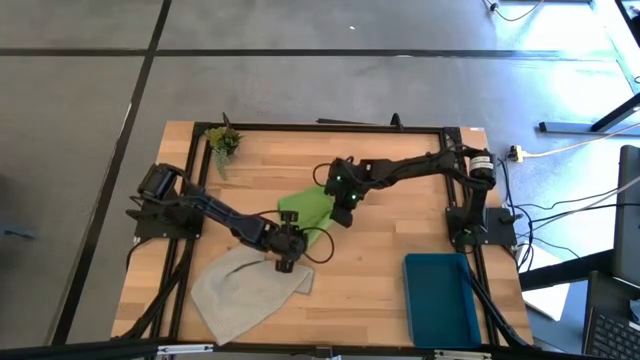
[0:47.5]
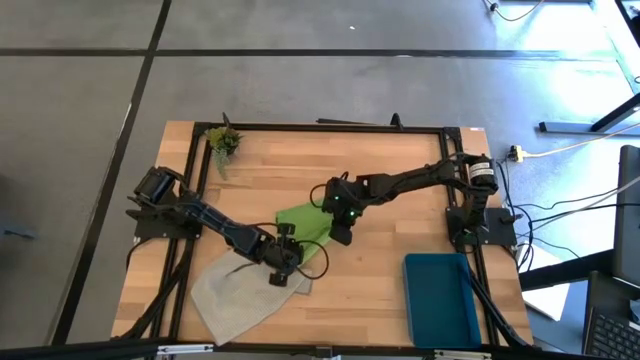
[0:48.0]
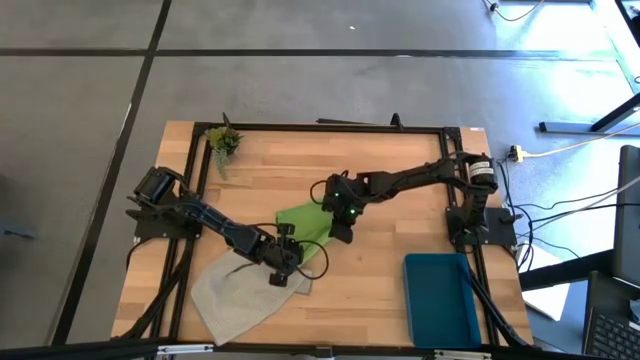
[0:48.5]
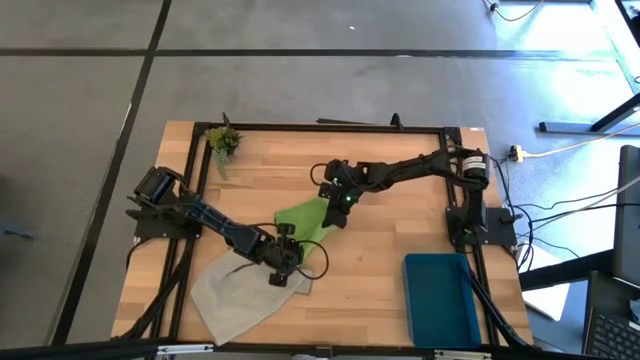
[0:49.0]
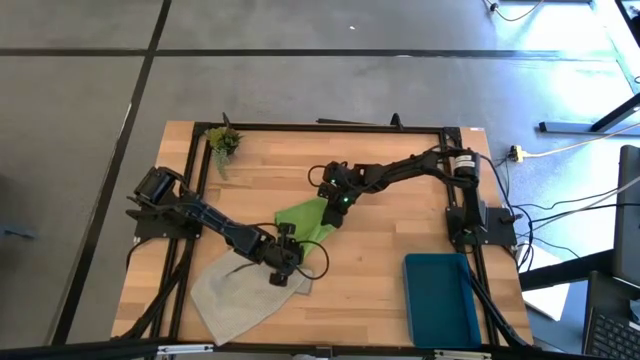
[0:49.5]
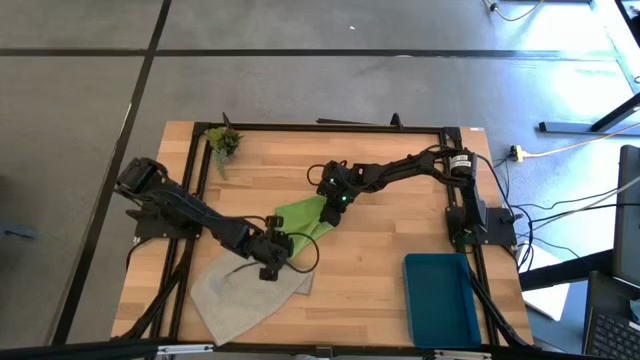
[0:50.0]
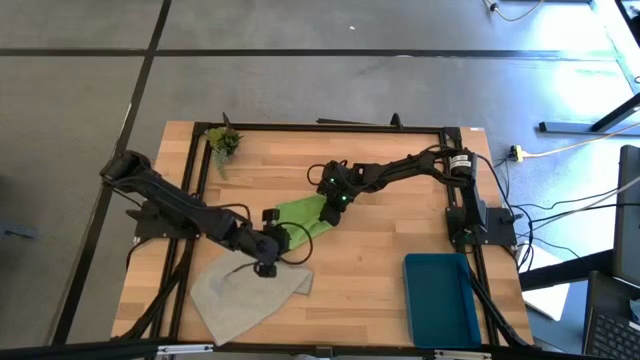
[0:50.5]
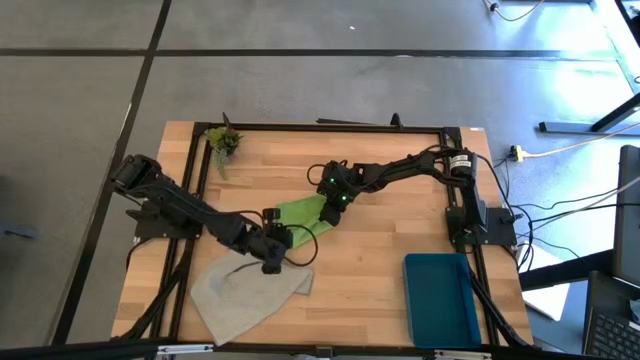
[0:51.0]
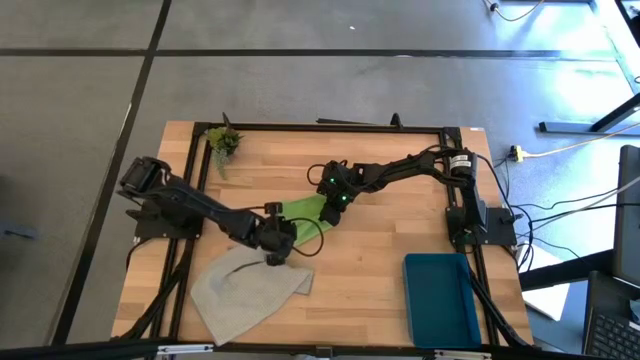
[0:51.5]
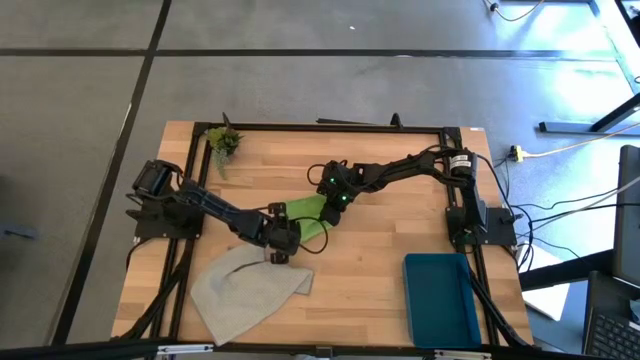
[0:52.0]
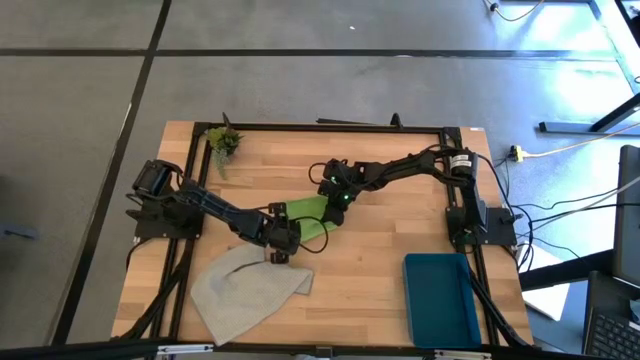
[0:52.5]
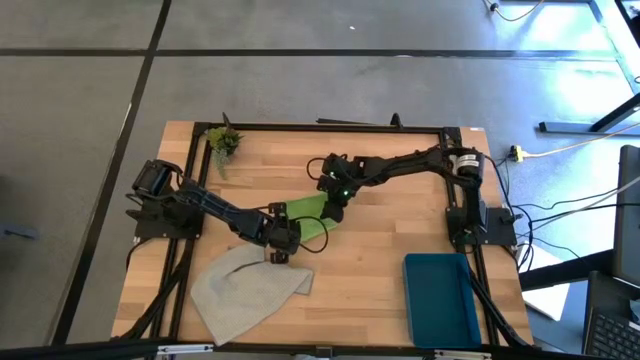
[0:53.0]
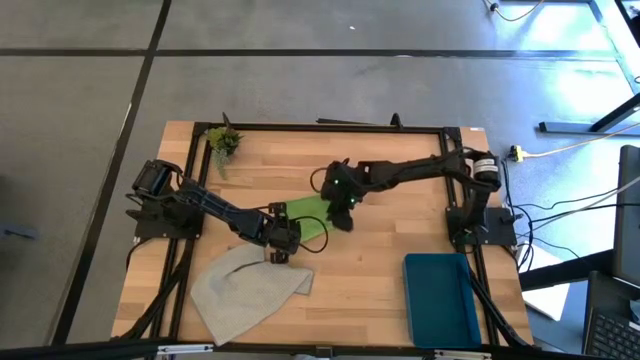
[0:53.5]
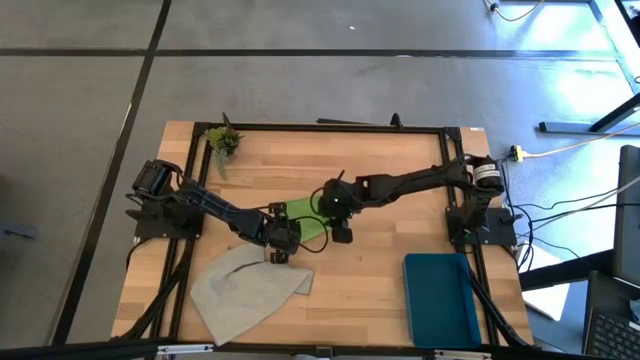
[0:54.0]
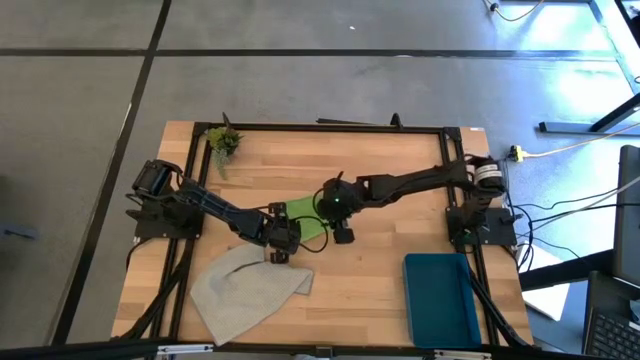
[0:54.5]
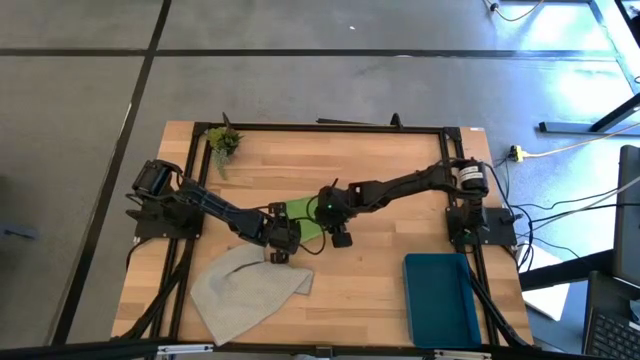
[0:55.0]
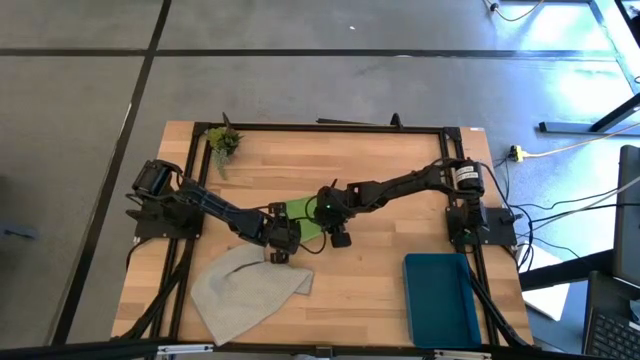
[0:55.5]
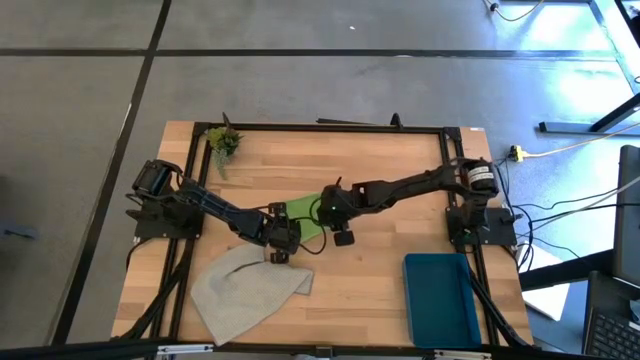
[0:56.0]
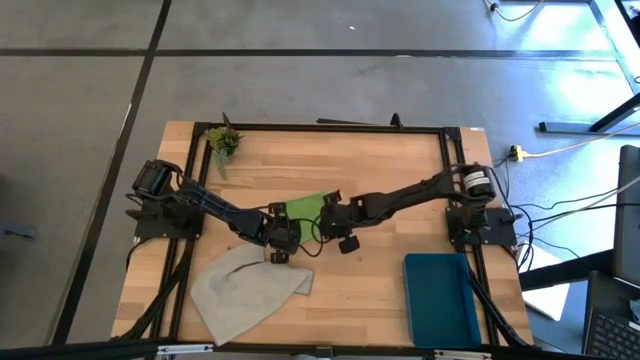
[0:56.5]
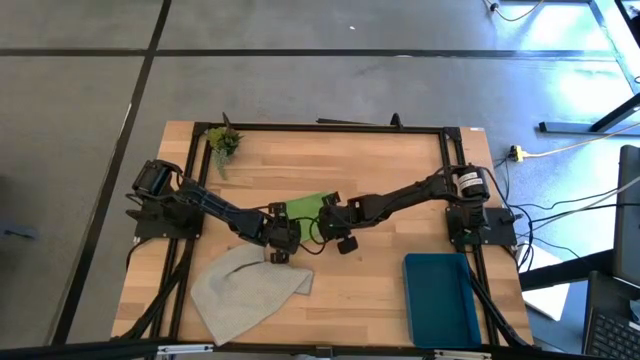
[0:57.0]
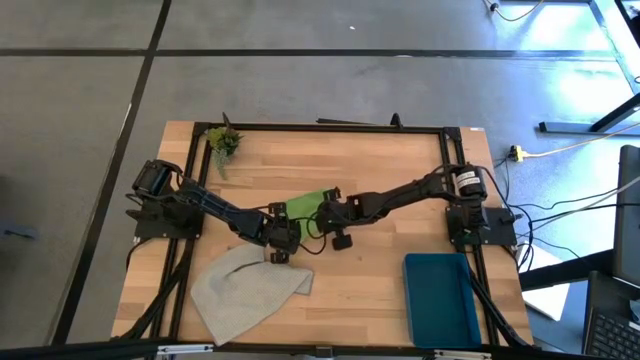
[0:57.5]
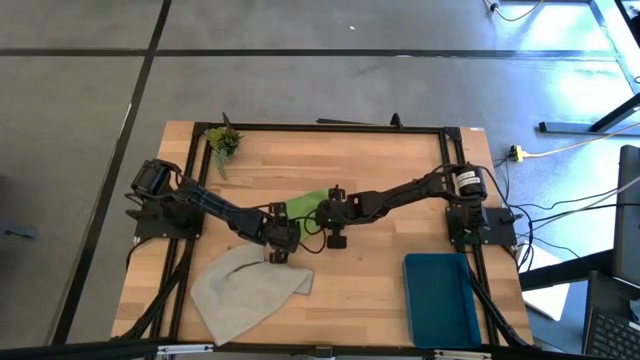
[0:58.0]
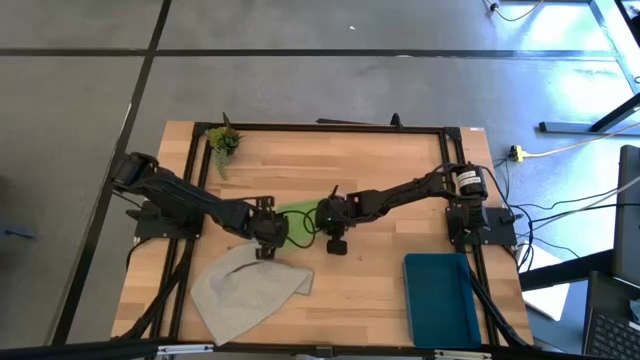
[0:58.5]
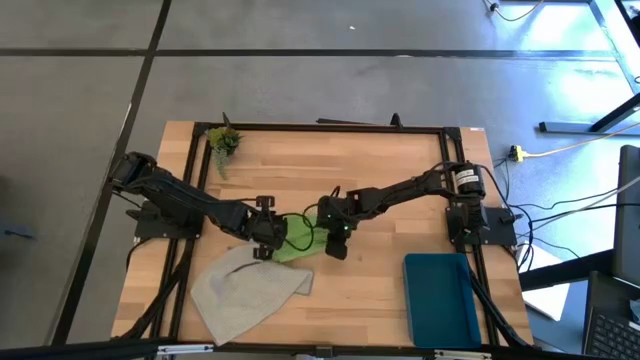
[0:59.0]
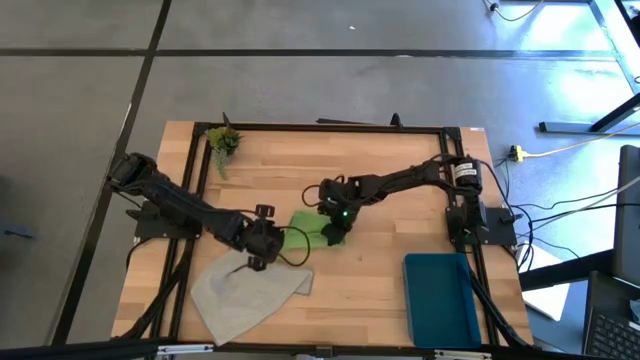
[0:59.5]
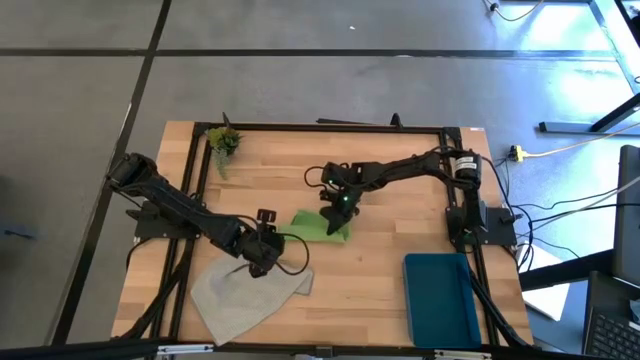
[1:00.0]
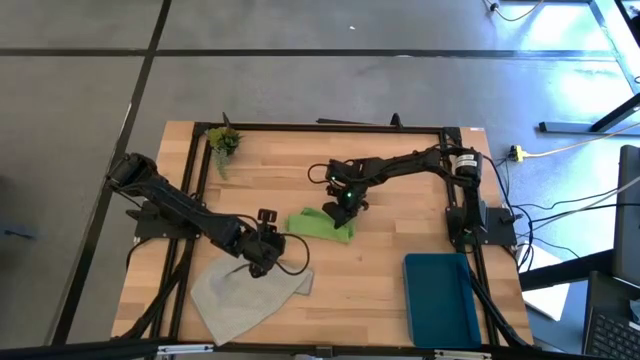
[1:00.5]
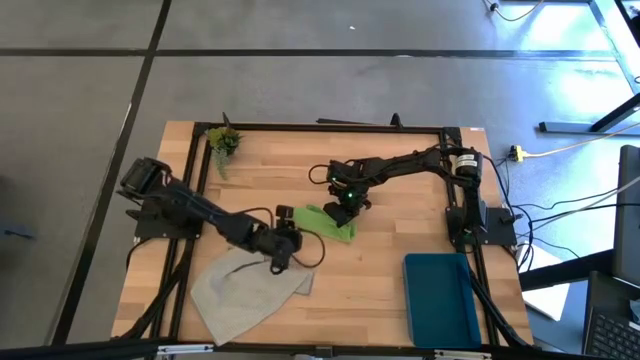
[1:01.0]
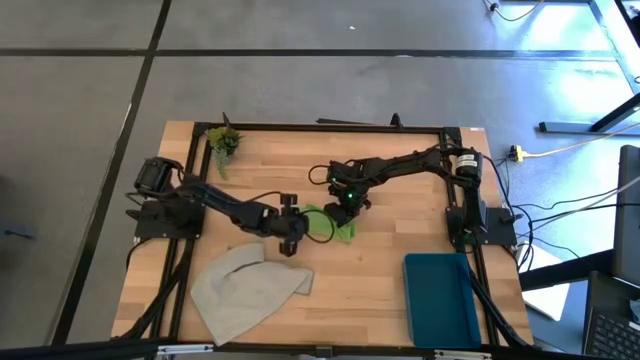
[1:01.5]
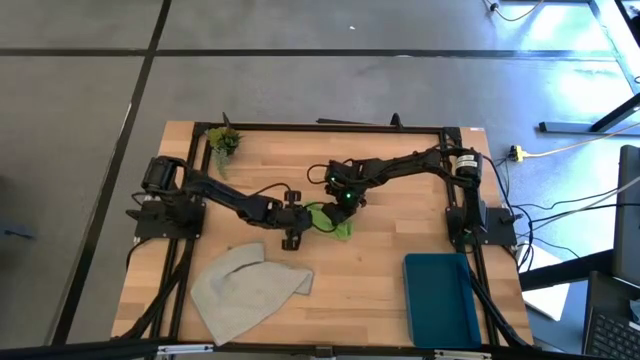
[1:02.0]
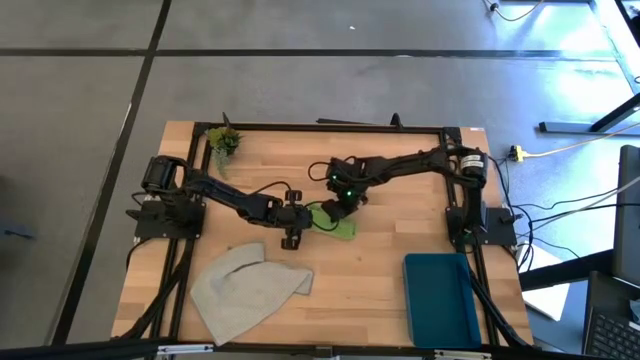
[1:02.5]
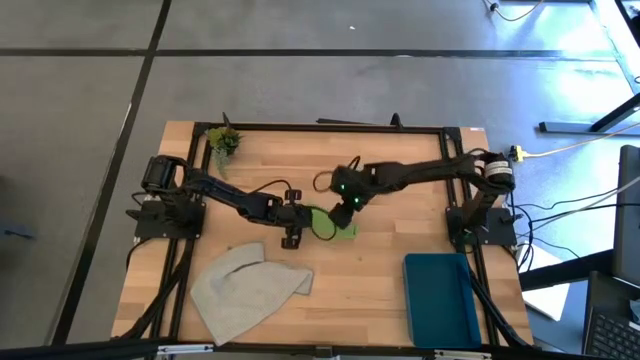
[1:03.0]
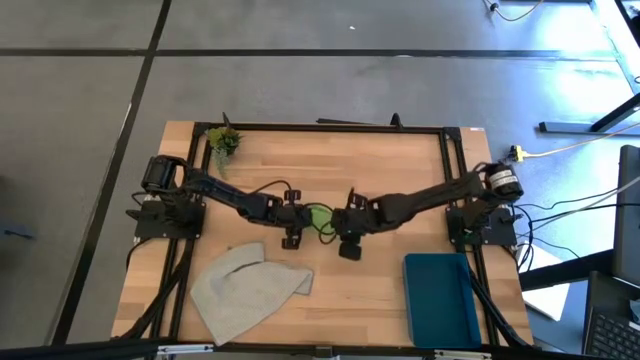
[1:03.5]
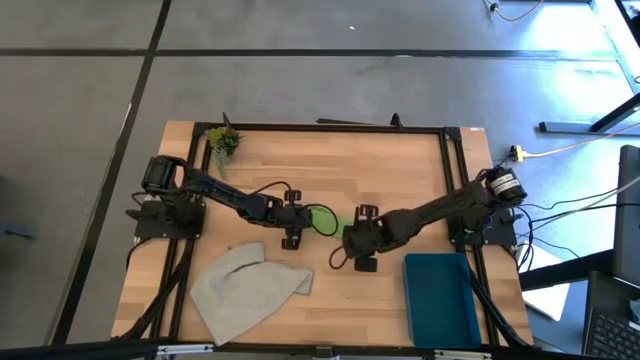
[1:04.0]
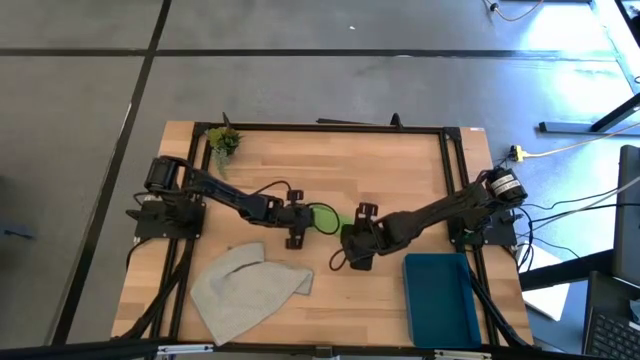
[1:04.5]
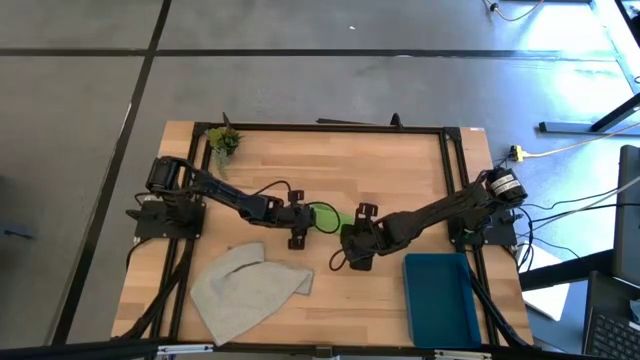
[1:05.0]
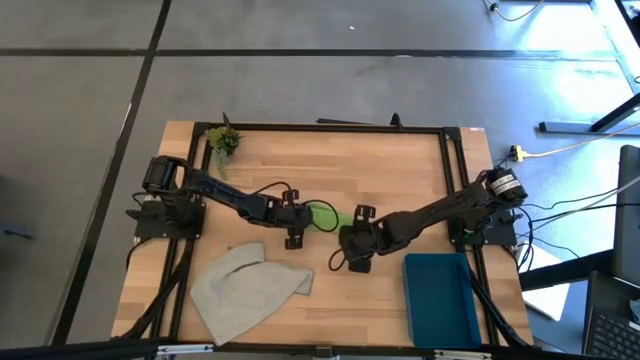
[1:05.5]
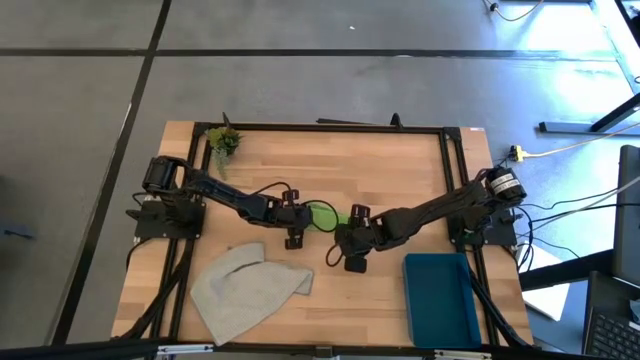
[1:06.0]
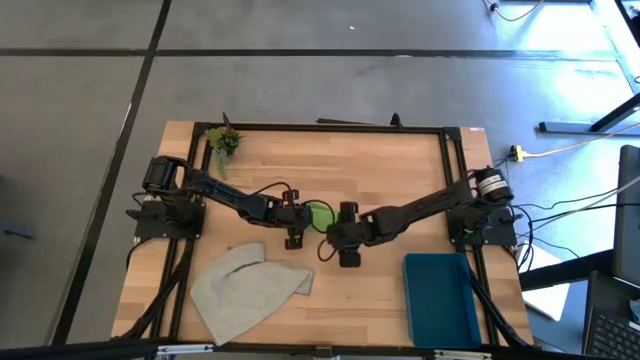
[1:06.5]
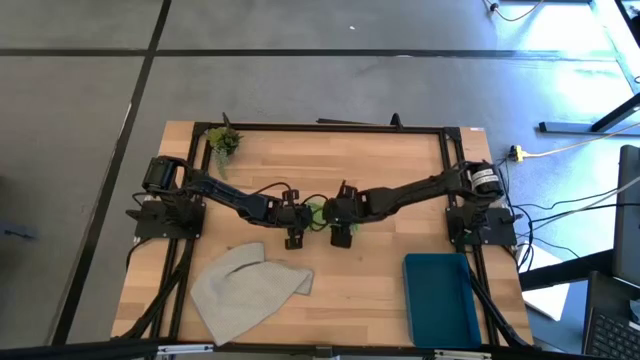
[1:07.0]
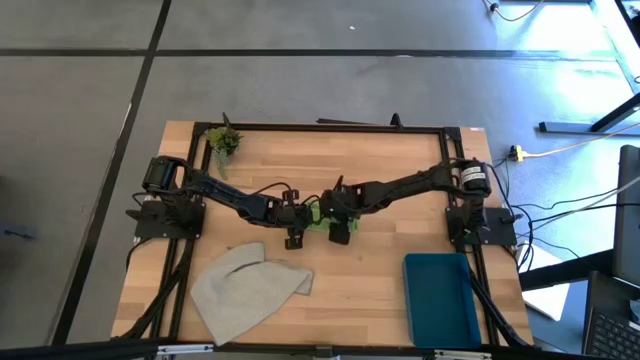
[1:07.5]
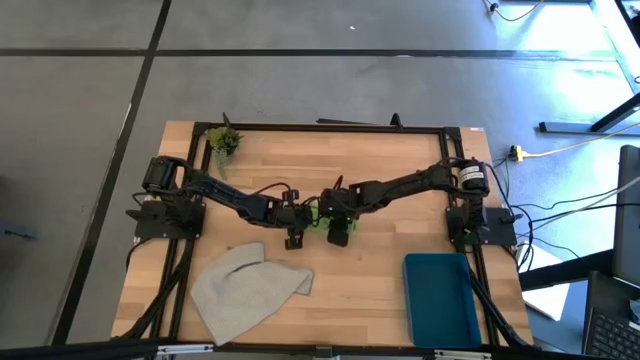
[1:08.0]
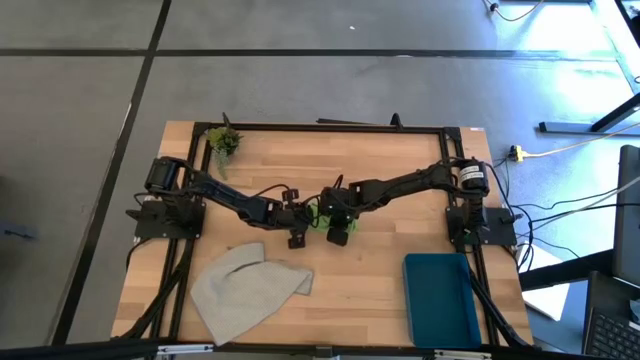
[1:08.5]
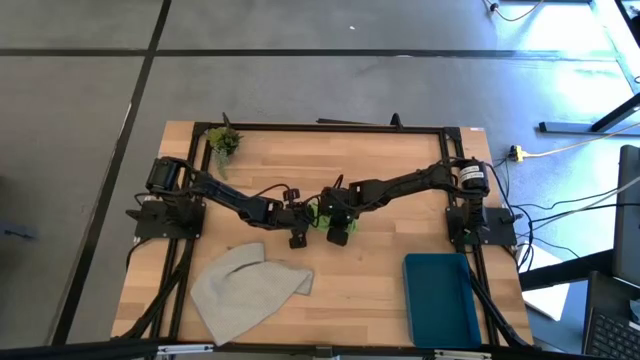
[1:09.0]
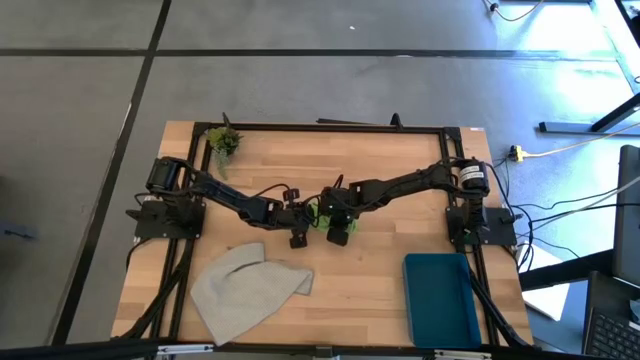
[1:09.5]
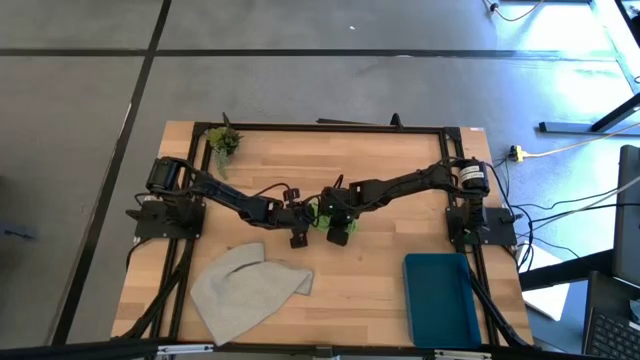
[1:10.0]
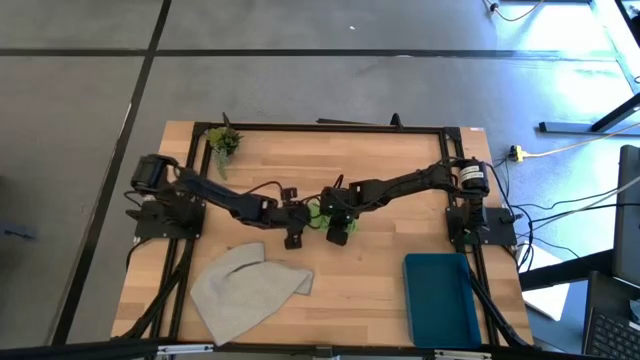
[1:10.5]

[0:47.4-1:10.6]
Task: Roll microfiber towels into tight, uniform cylinder then place into a basket
Roll the green microfiber cloth
